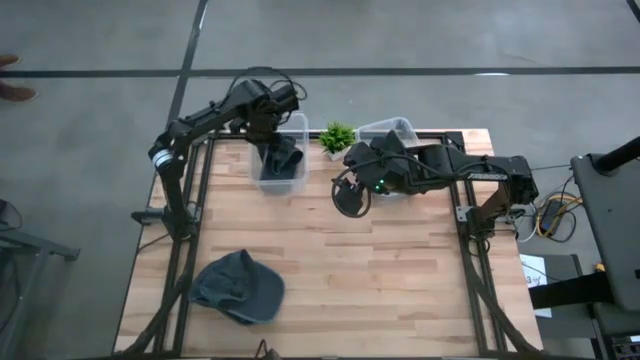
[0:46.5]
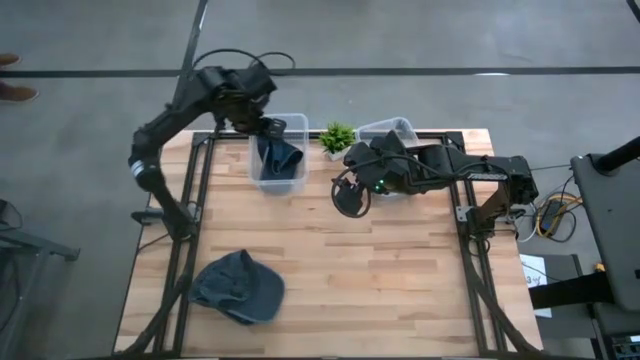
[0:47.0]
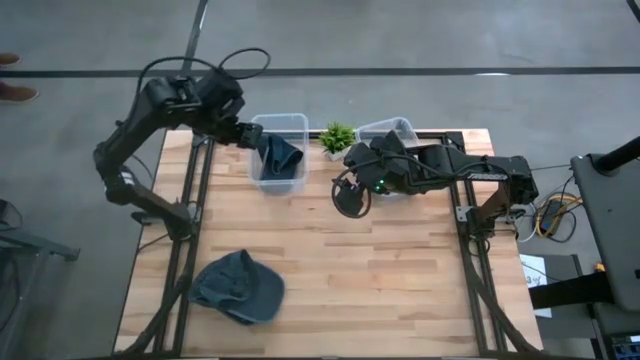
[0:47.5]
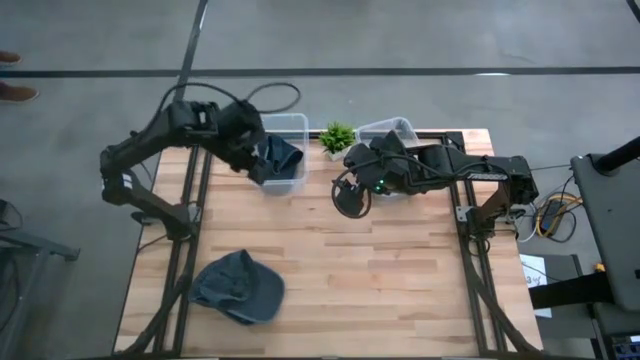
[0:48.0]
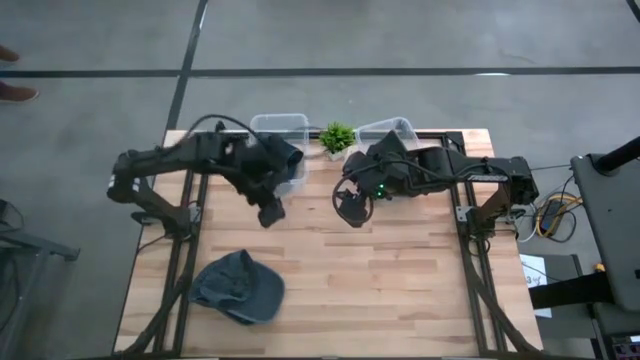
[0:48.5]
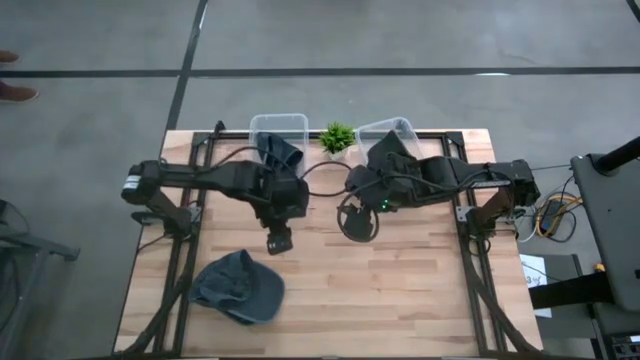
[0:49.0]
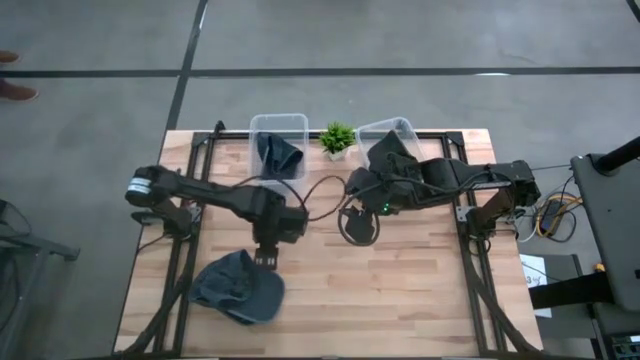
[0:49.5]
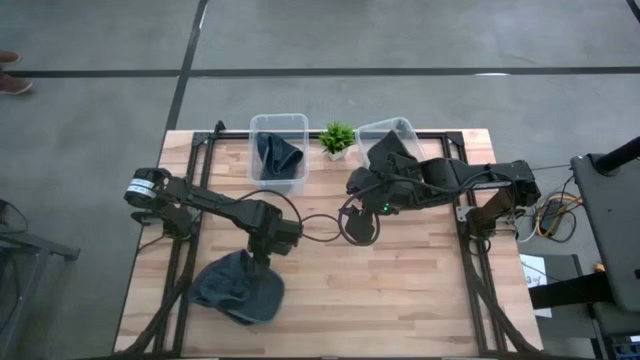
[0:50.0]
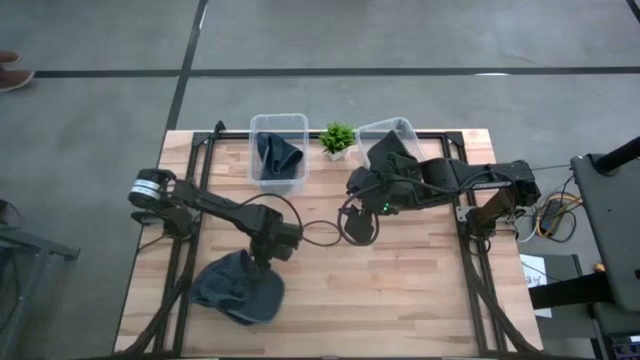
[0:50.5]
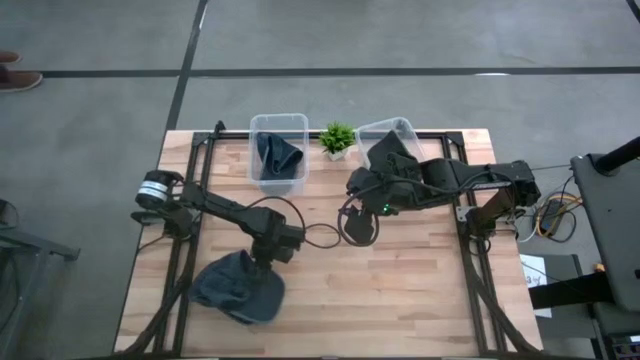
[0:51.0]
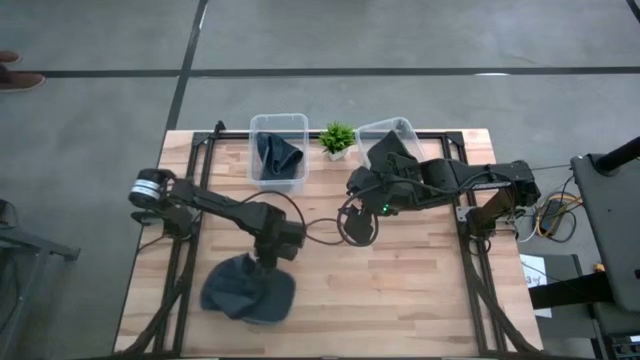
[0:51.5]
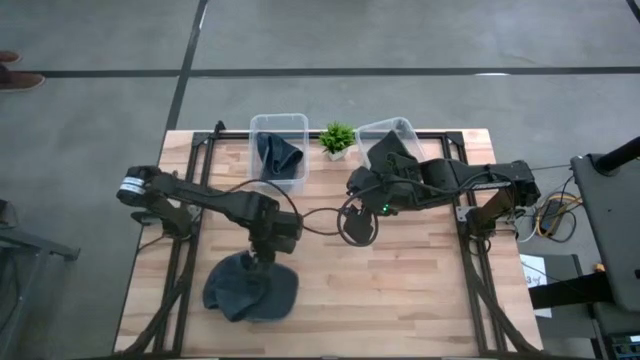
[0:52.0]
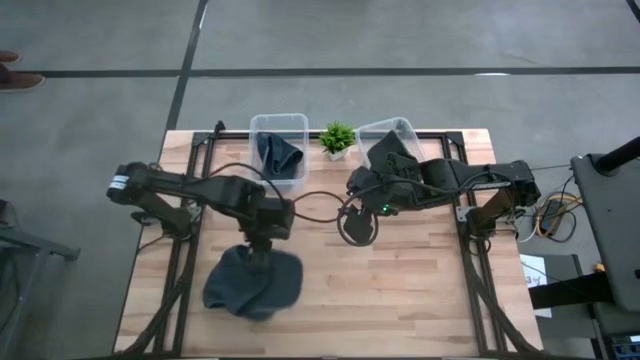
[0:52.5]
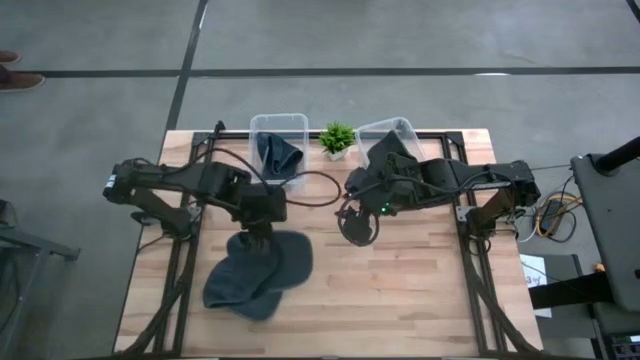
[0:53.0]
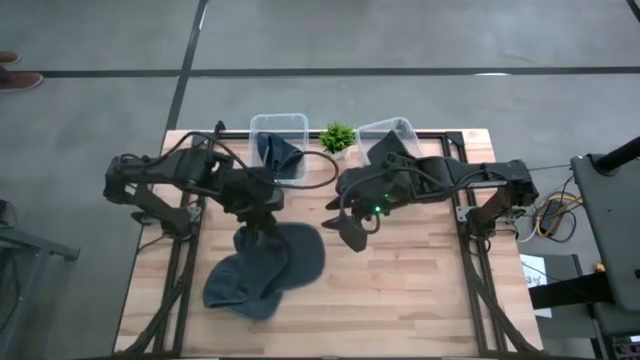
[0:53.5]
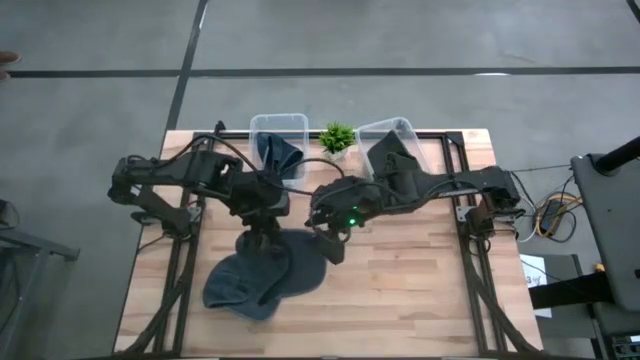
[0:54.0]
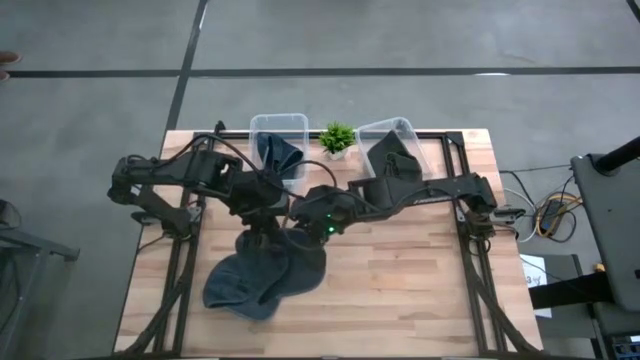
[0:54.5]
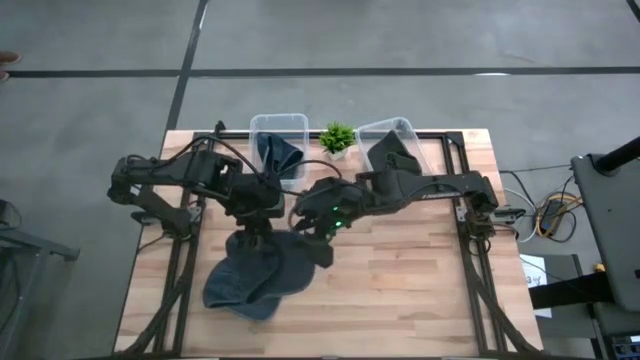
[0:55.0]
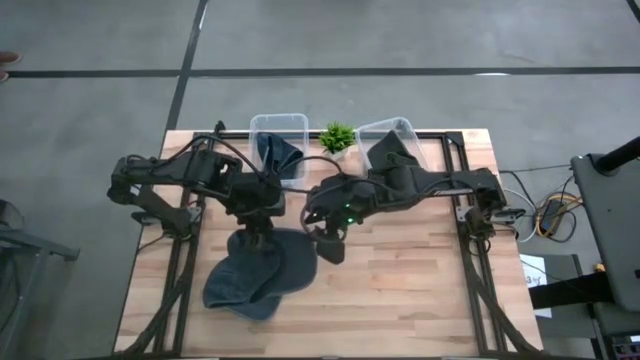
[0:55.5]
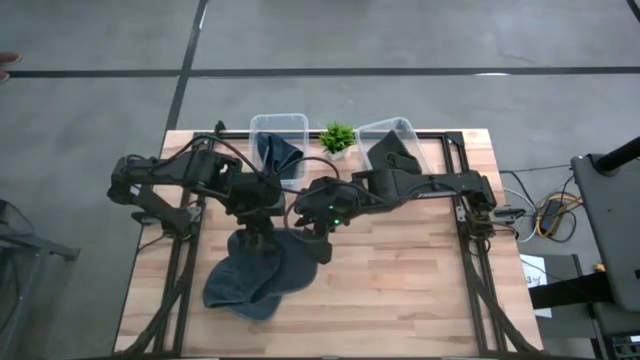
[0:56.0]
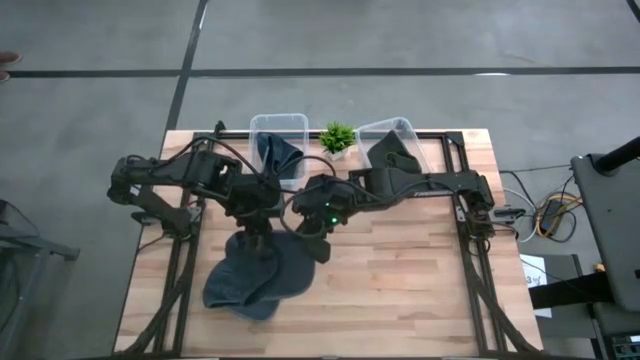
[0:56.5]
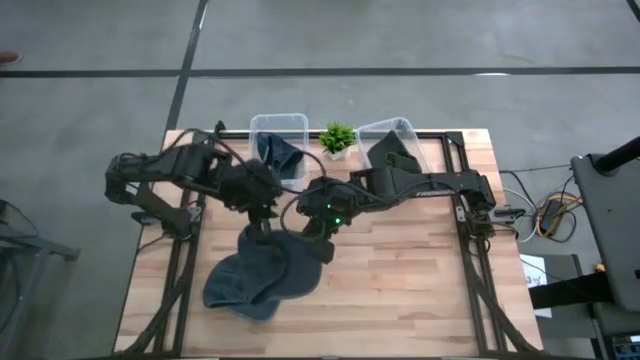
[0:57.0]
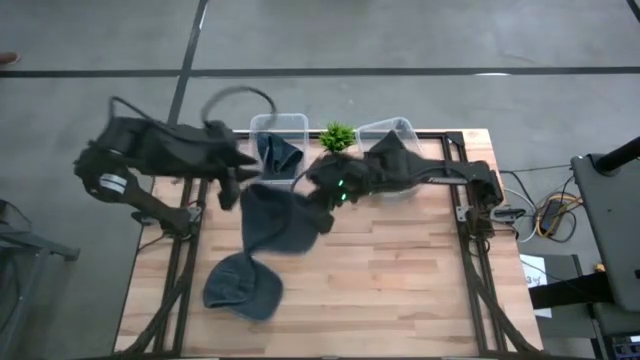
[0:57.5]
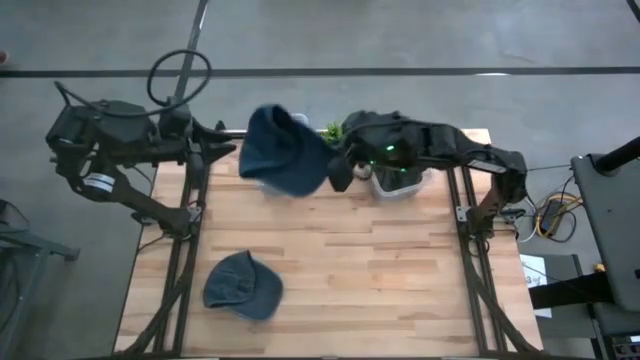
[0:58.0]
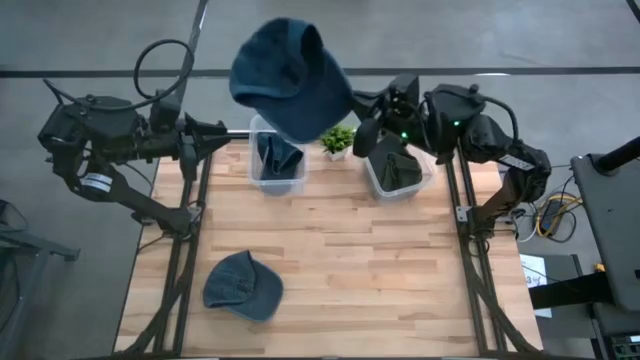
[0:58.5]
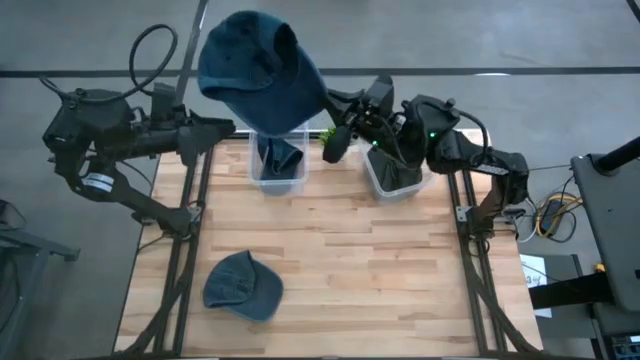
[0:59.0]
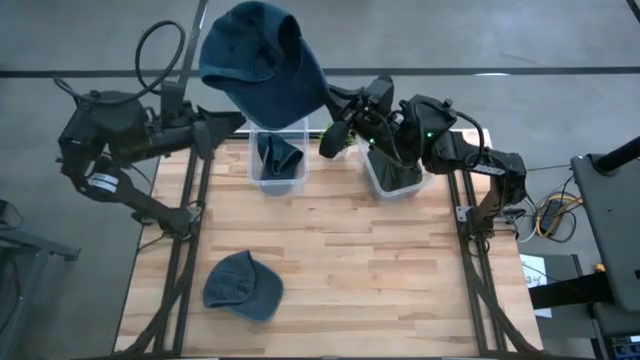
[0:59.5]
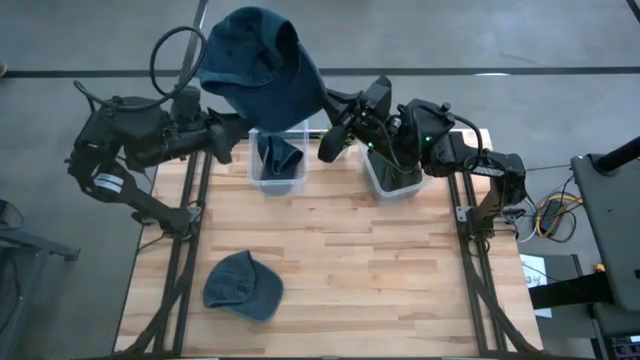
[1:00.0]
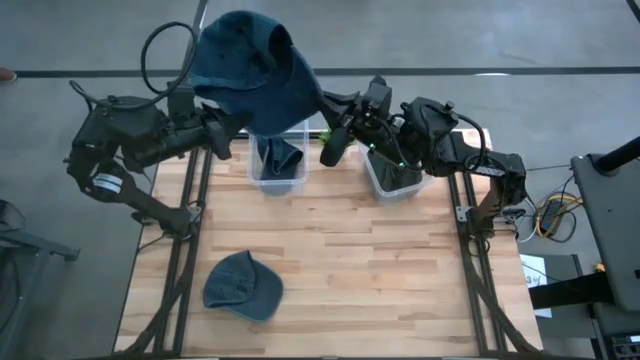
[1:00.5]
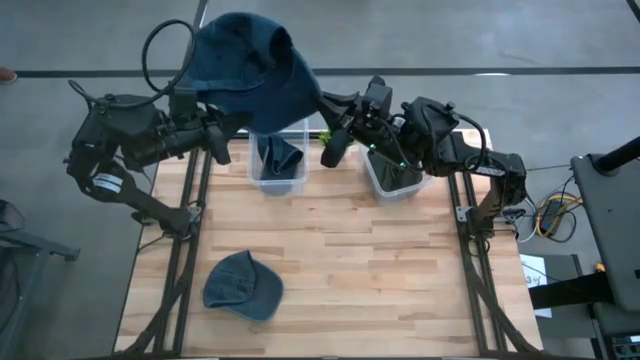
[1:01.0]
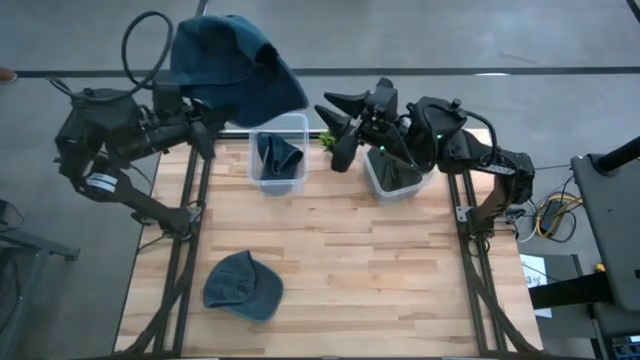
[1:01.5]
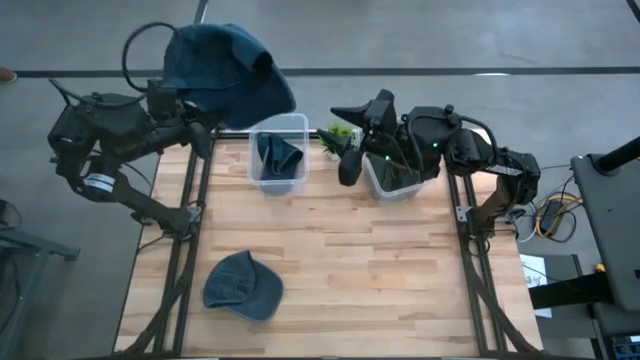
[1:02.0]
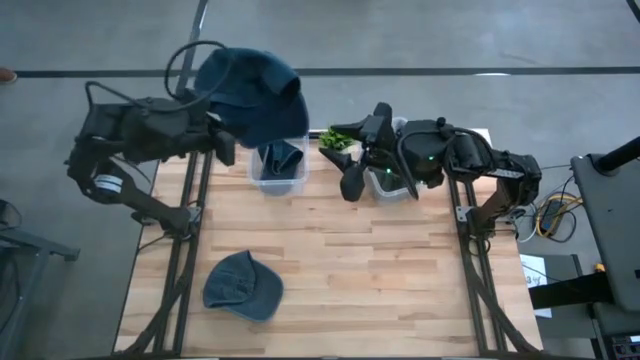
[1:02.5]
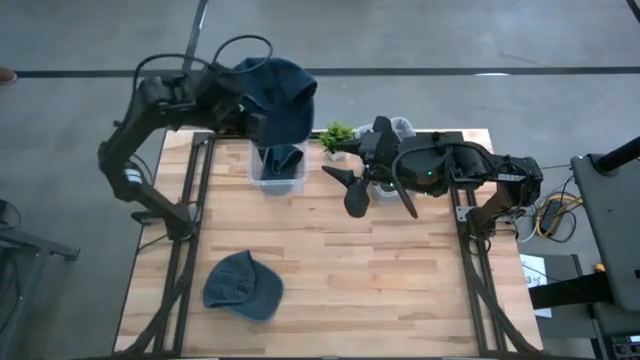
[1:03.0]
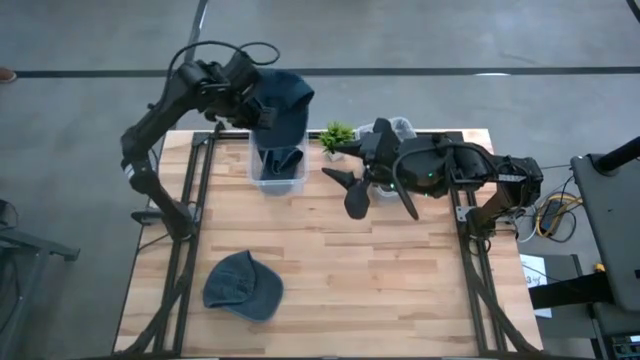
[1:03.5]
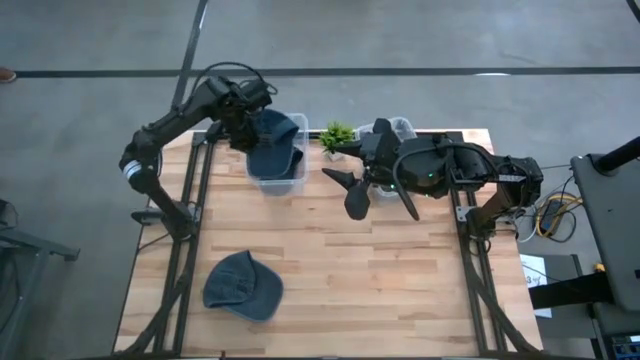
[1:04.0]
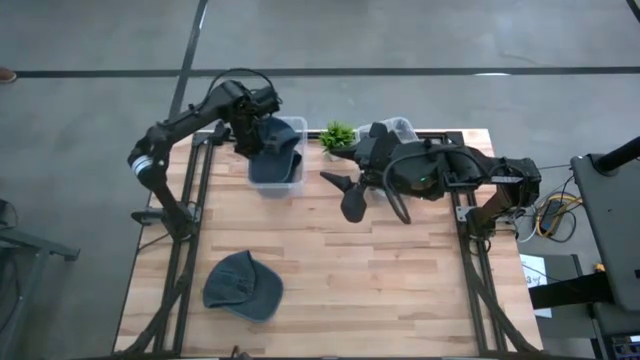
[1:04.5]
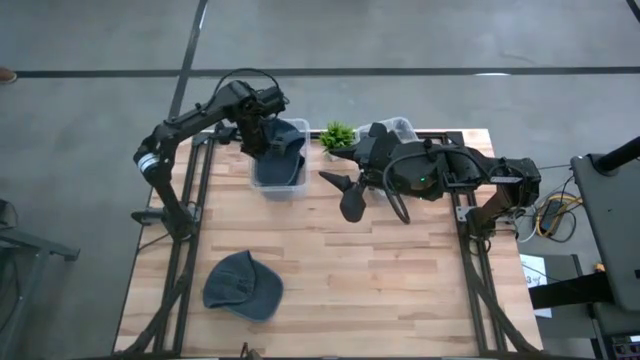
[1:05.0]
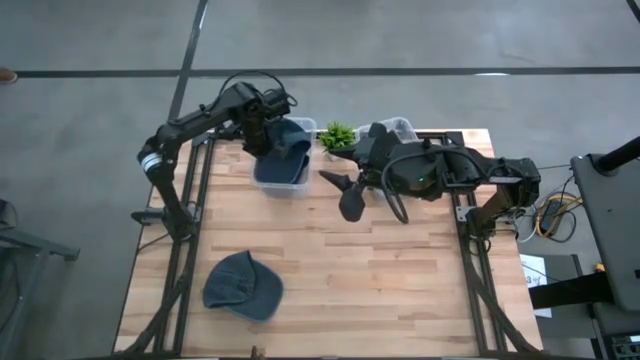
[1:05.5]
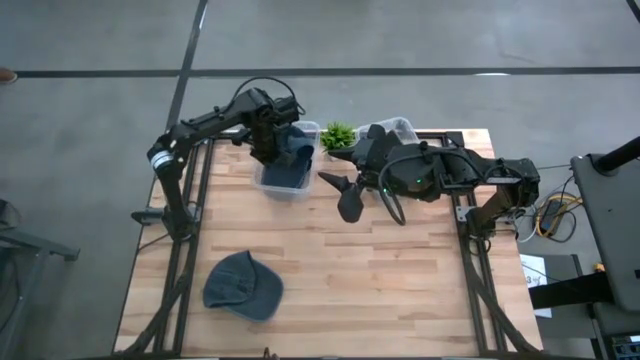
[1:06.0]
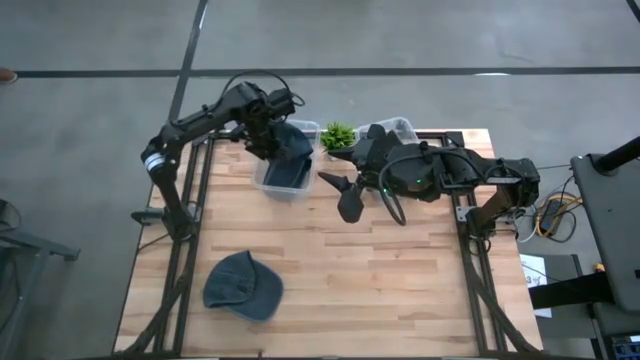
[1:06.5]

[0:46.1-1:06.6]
Task: Pick & Place hat
Put the right blue cap into the left transparent bin

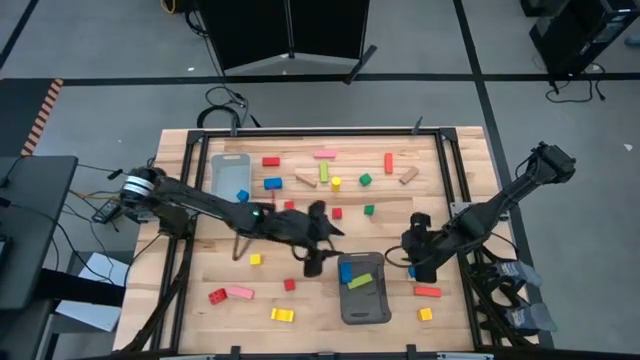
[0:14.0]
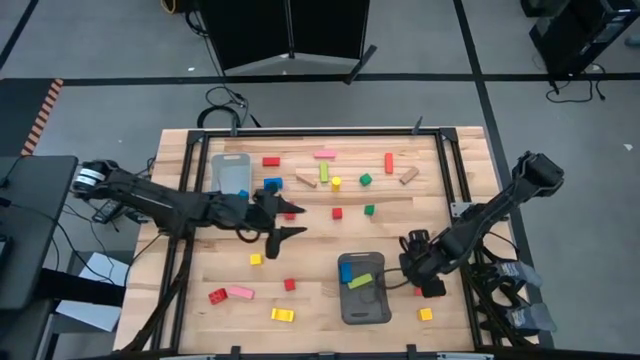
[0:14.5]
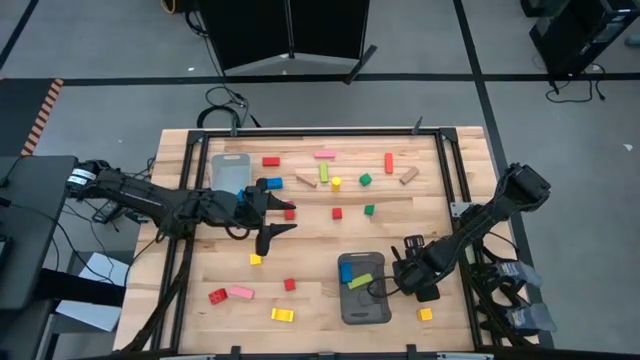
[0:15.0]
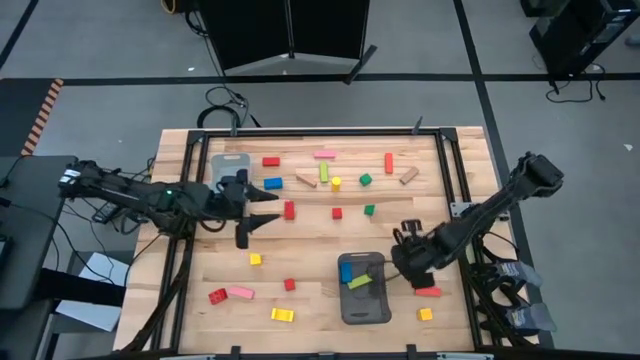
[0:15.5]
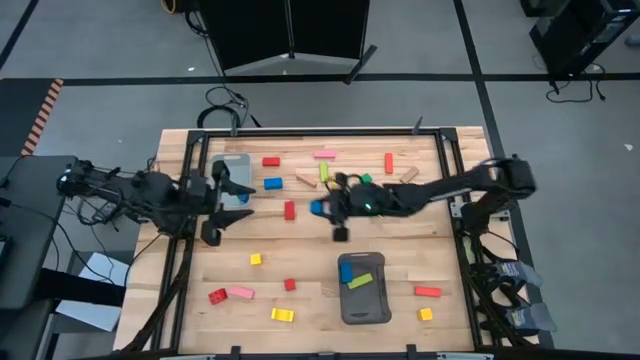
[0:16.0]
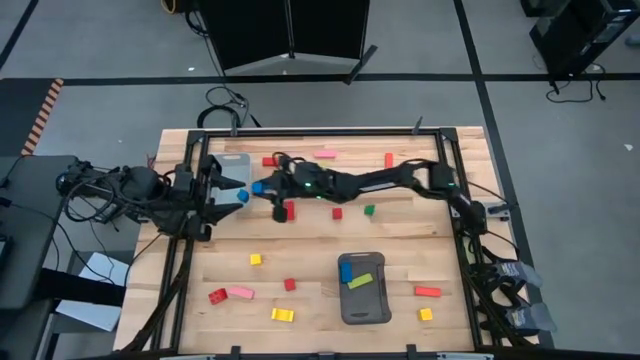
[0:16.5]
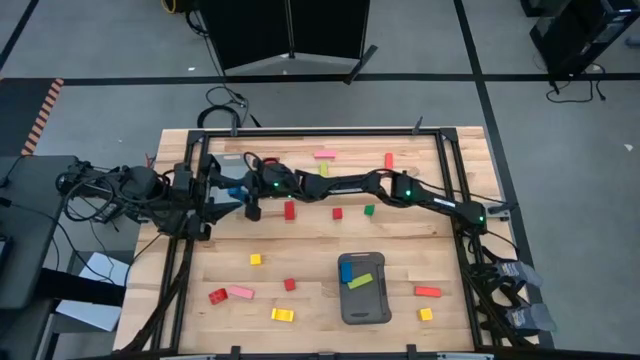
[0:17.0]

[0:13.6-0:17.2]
Task: Sort blocks by size
Put the blue cube block into the gray bin
